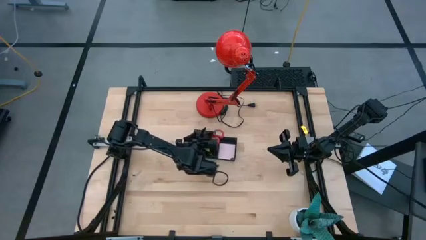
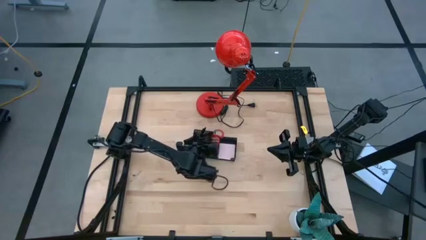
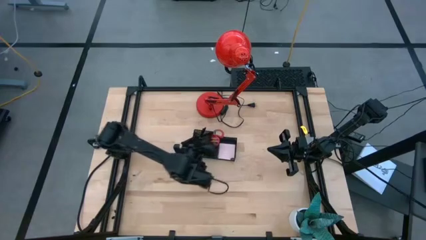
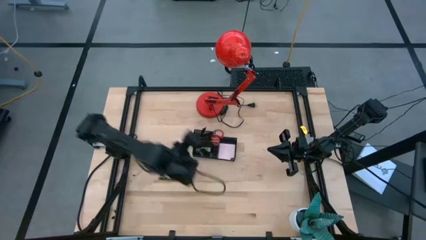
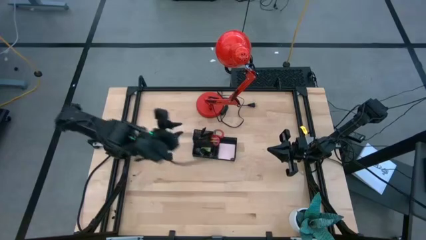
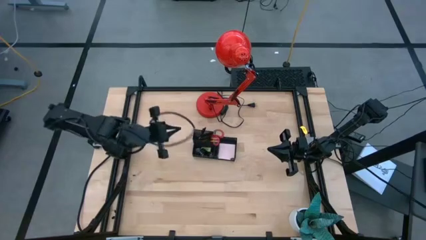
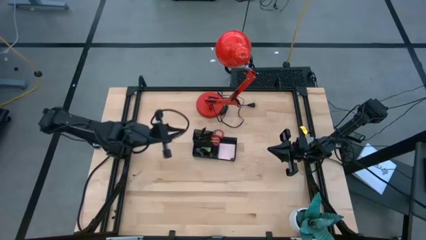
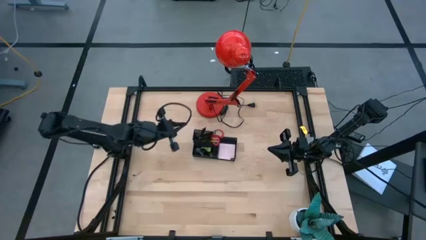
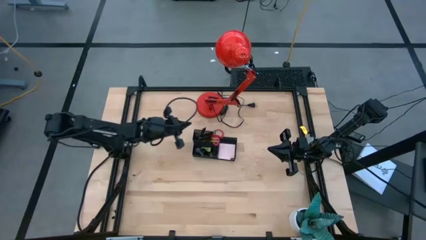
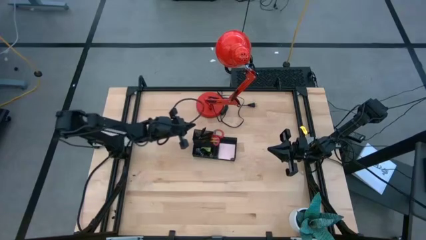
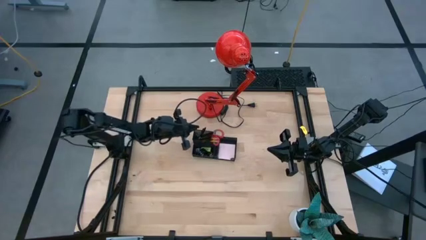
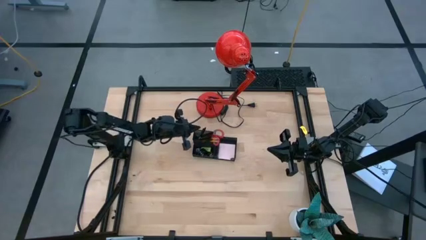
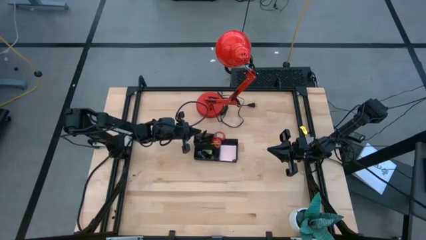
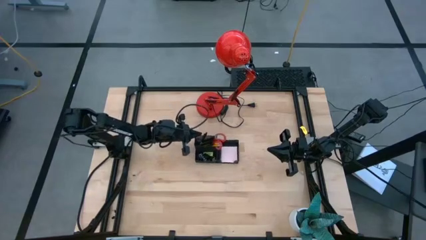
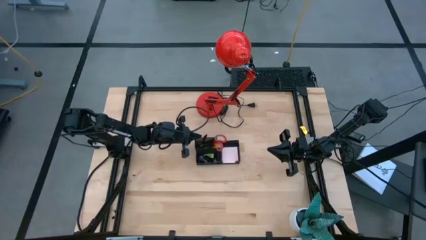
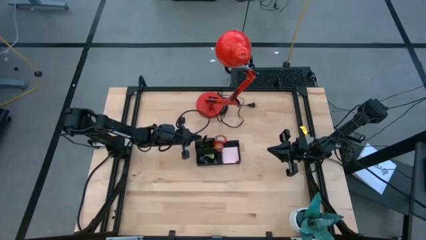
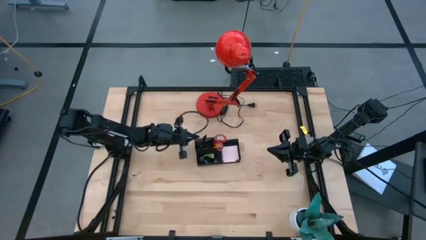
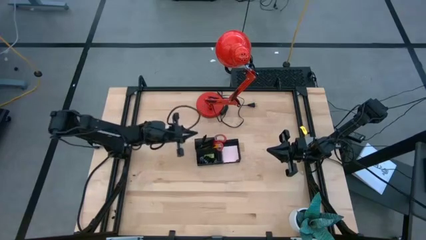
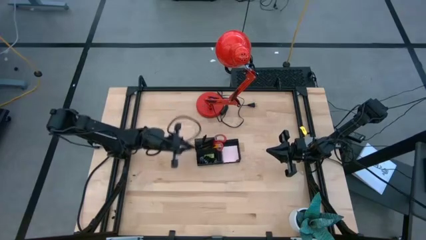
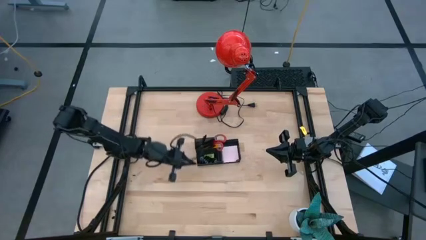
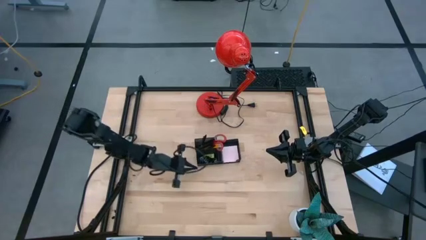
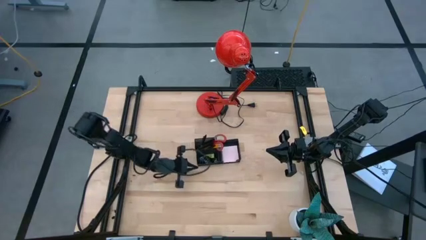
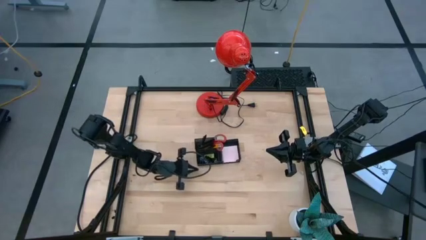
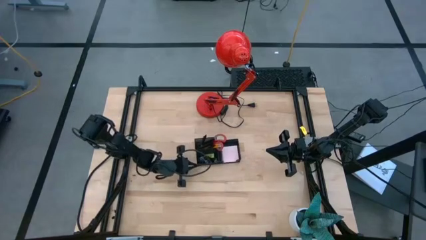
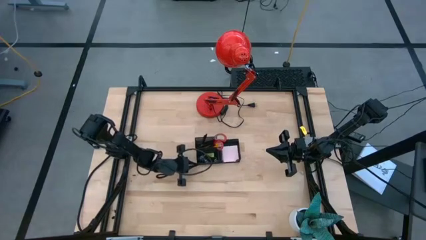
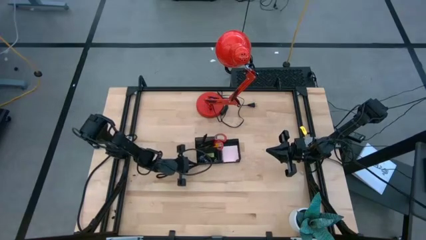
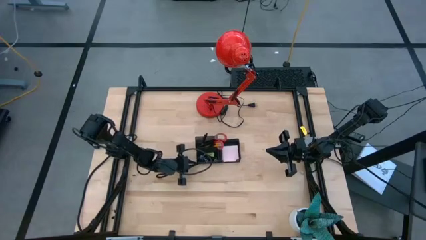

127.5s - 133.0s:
Task: Pick and place office supplies into organizer
Adjust the black mesh desk organizer on the table

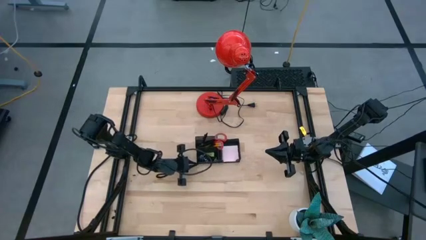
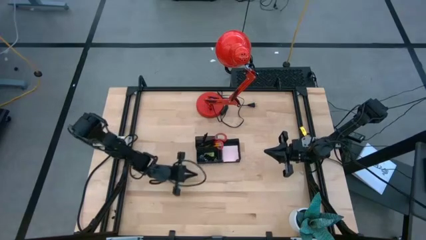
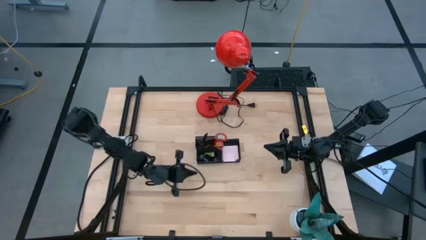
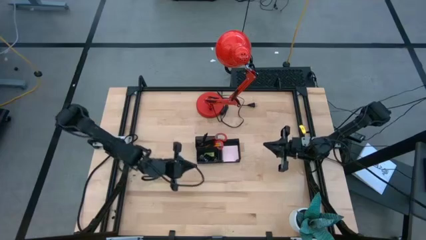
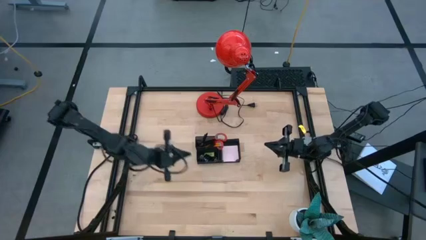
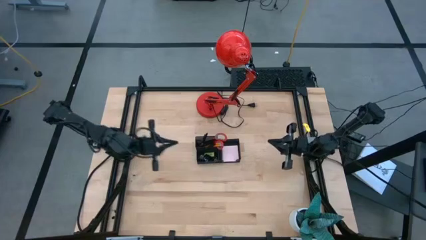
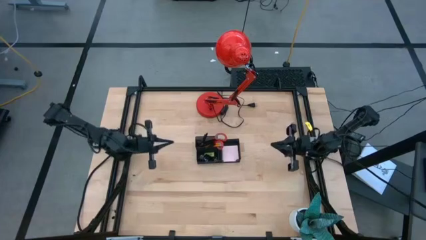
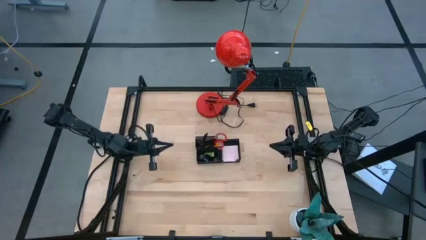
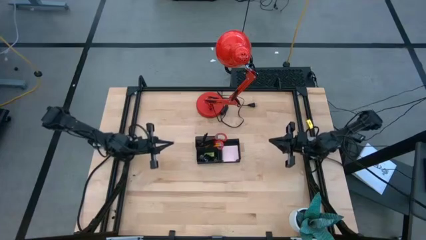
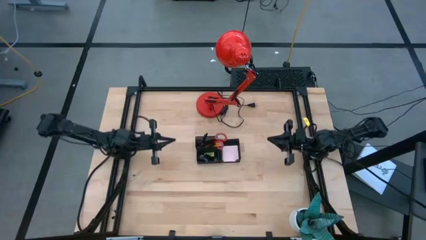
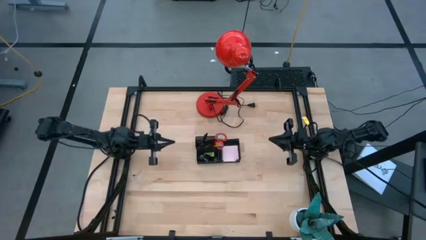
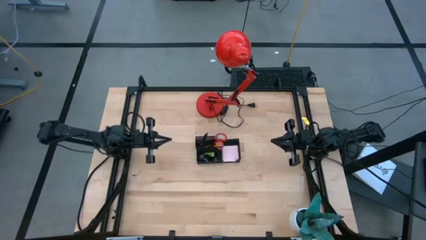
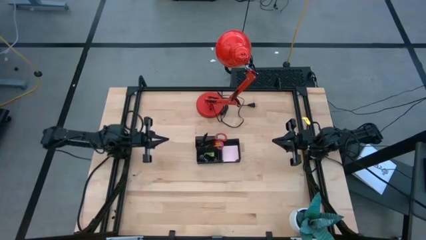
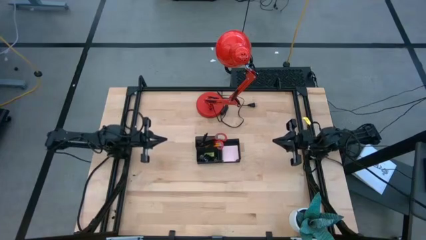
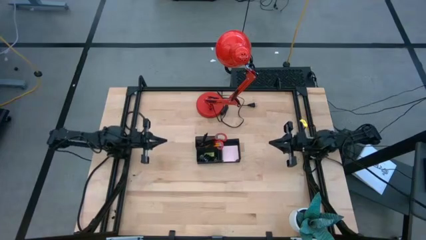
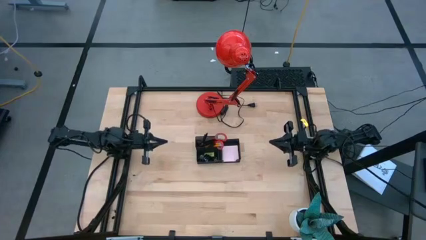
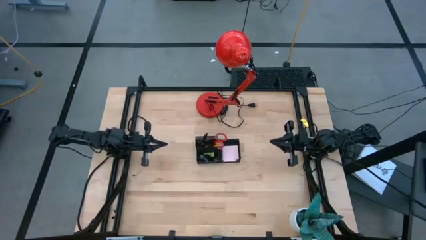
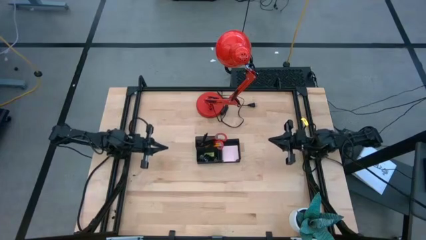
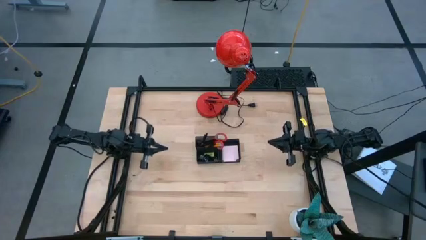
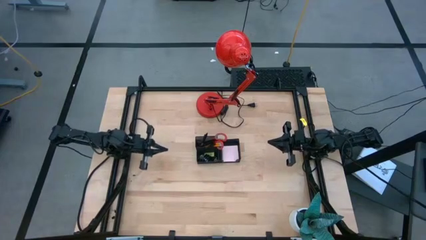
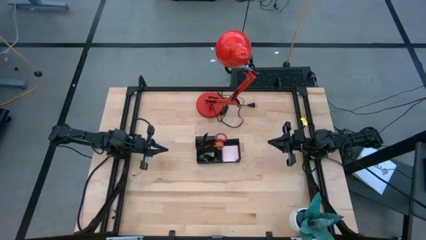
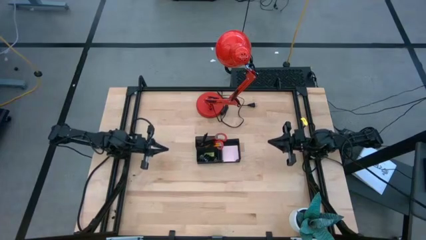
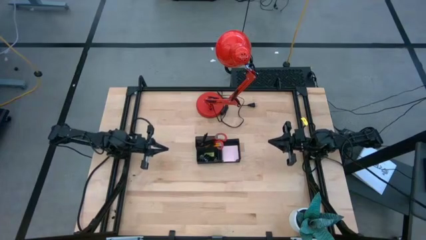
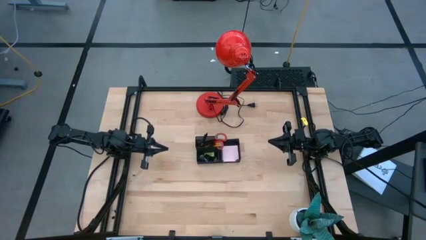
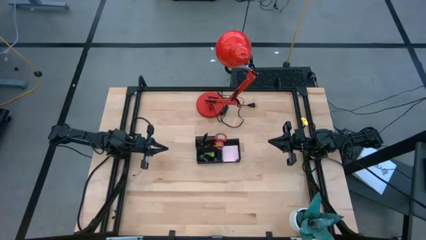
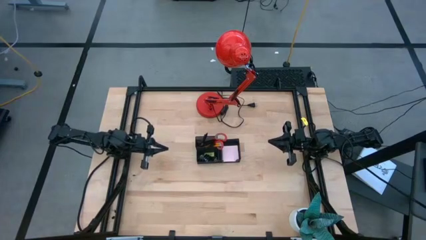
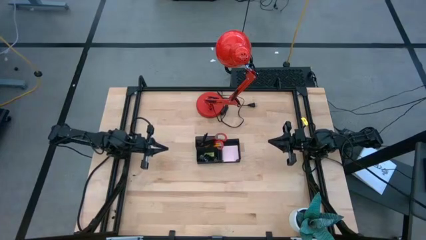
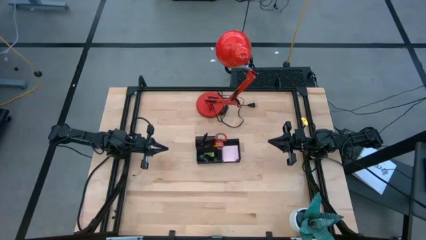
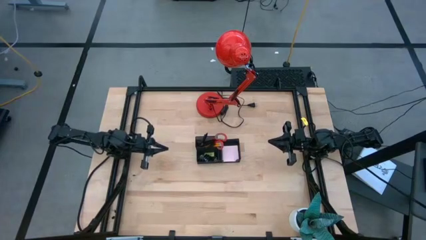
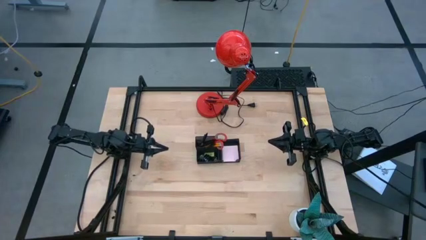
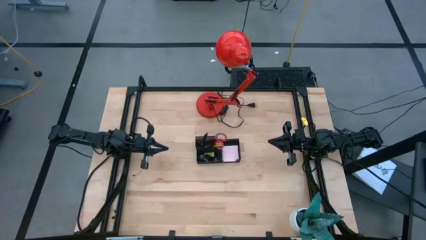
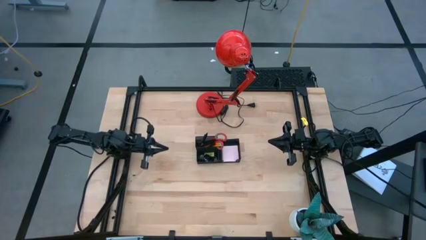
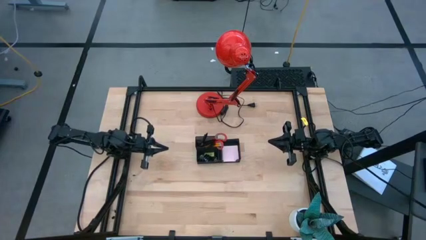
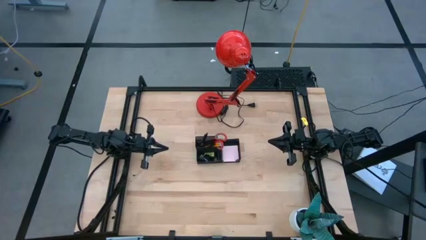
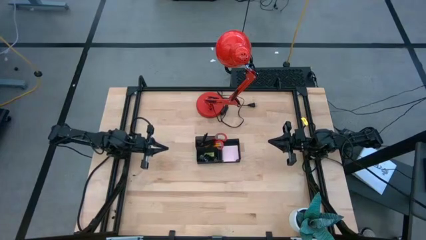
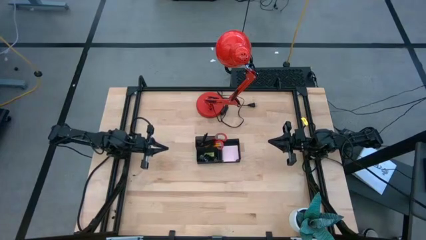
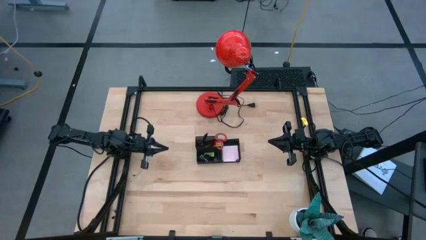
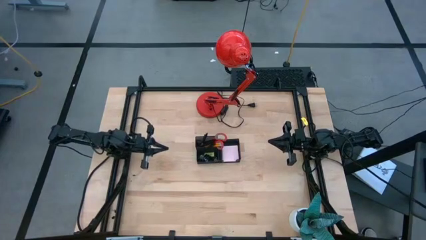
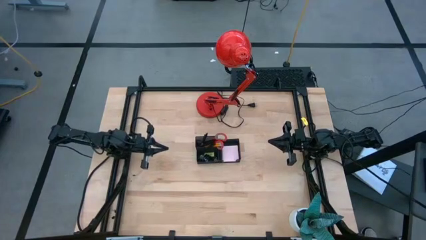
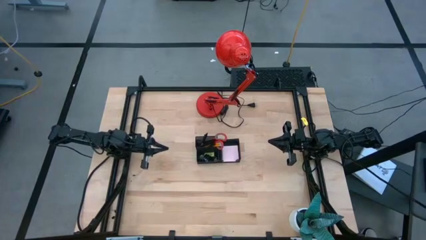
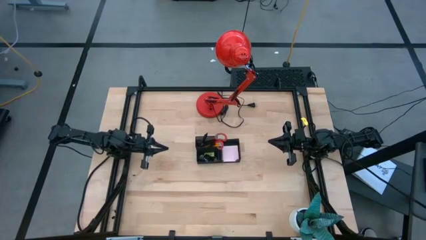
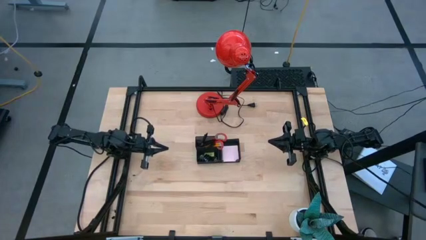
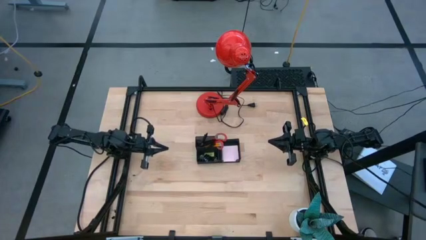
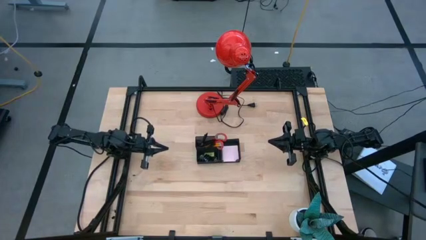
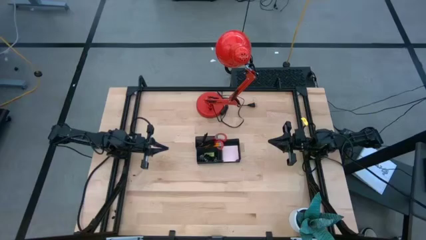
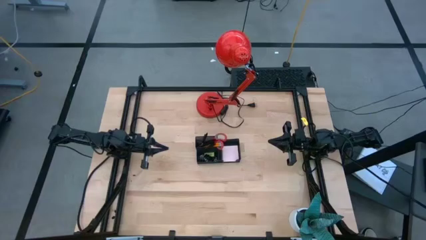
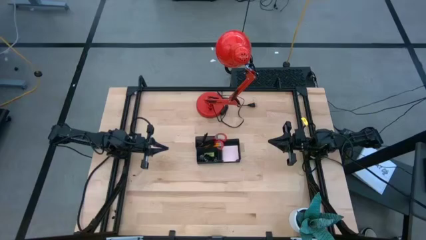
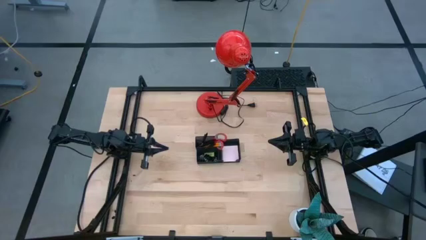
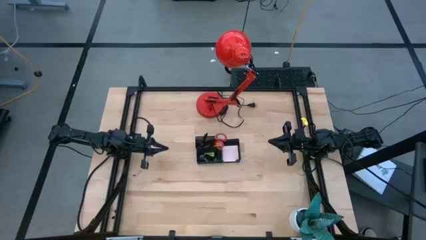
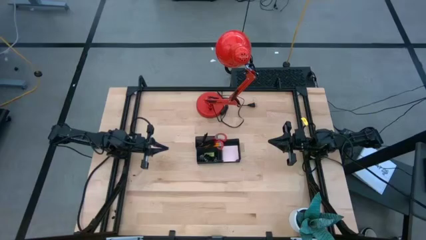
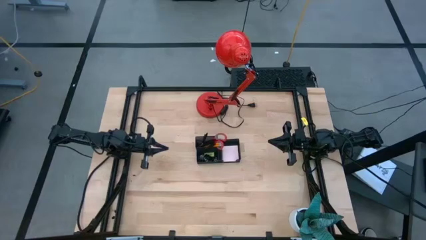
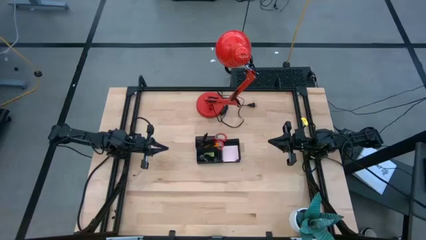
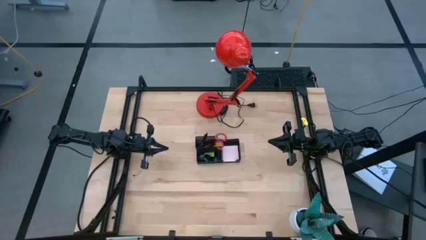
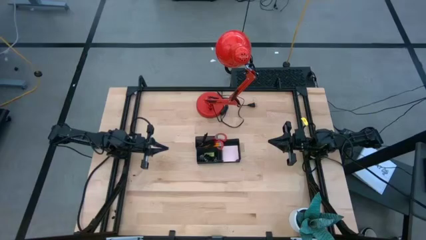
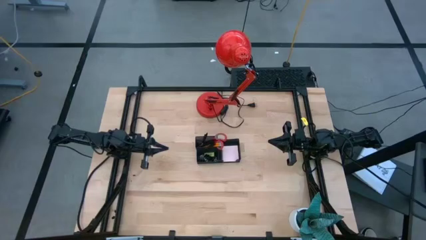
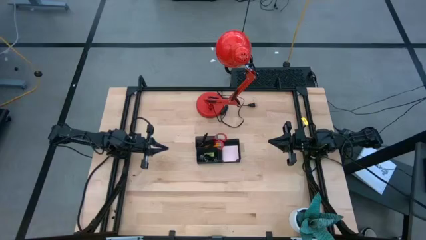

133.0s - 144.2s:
Return to Home Position

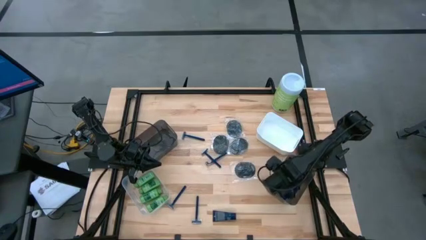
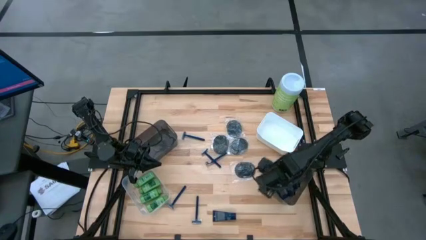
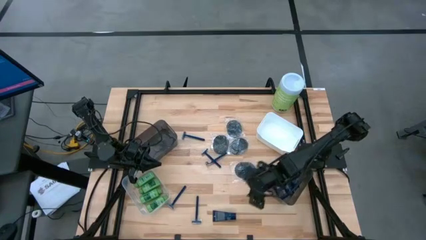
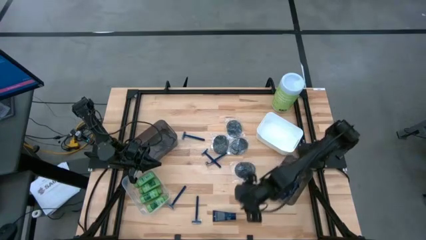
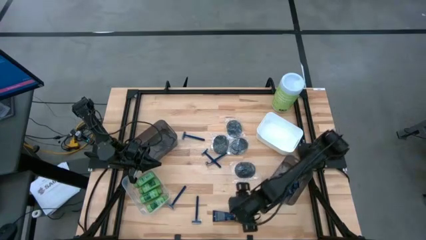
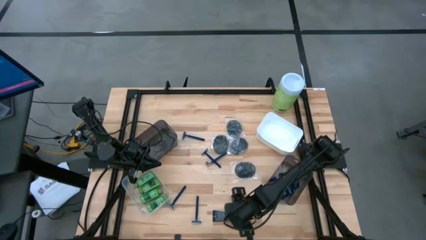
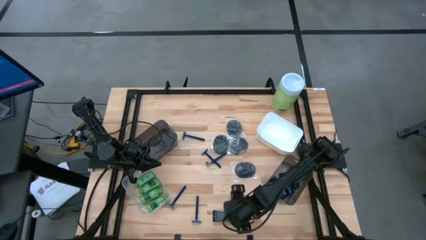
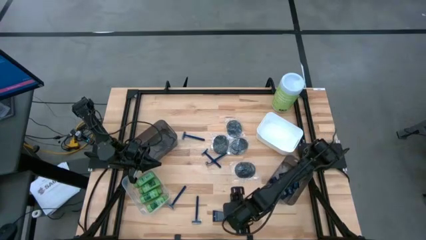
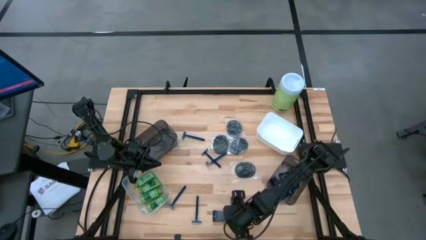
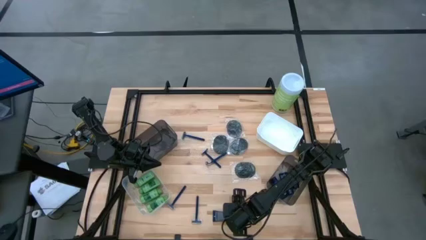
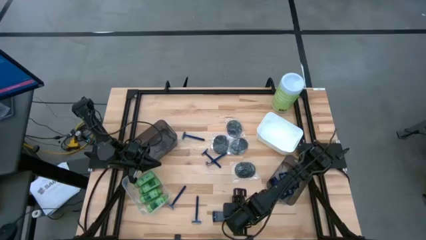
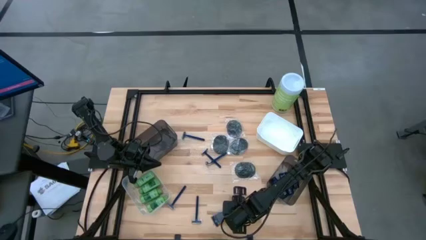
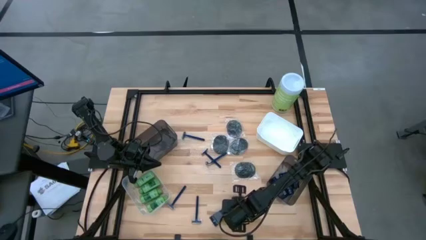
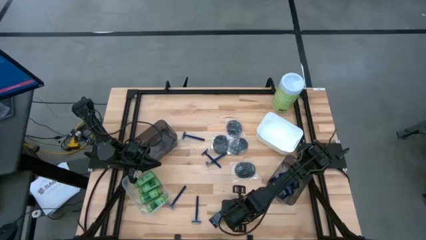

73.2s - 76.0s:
Task: Pick & Place Travel size toiletries
Put the blue shave cream into the right black bin
